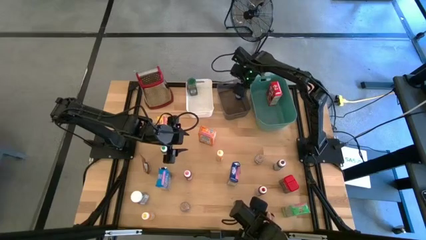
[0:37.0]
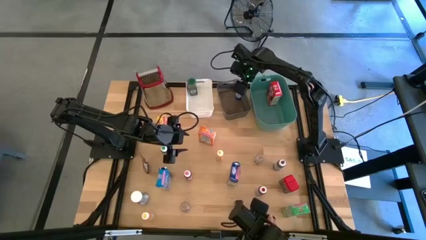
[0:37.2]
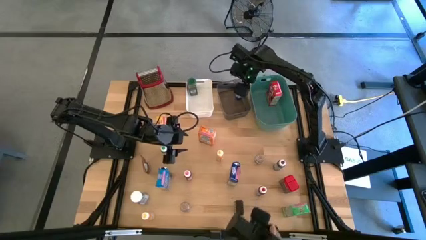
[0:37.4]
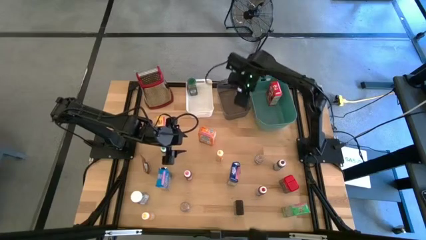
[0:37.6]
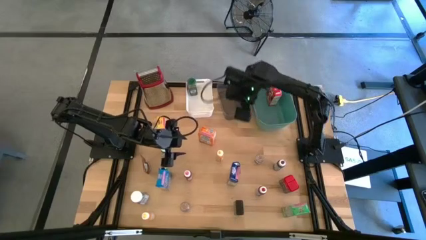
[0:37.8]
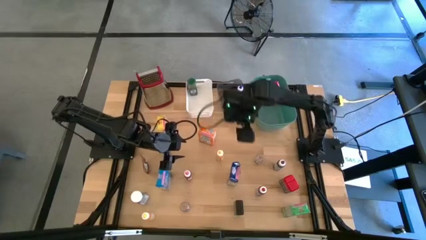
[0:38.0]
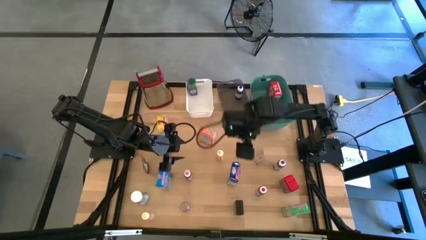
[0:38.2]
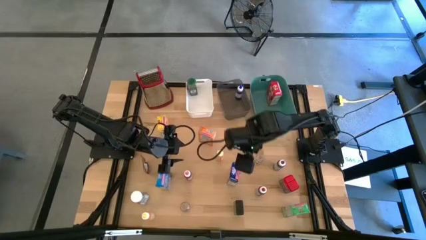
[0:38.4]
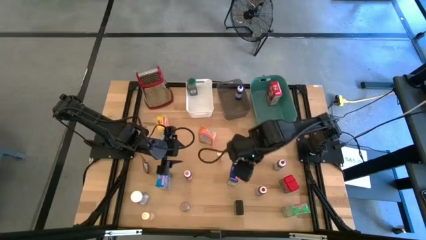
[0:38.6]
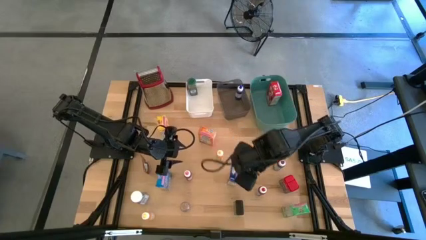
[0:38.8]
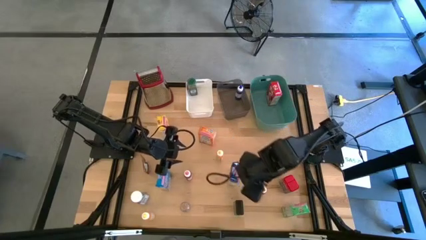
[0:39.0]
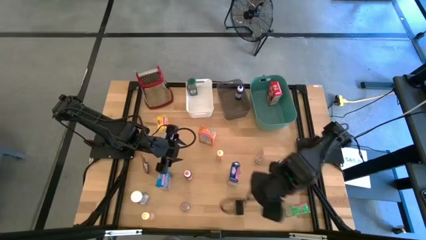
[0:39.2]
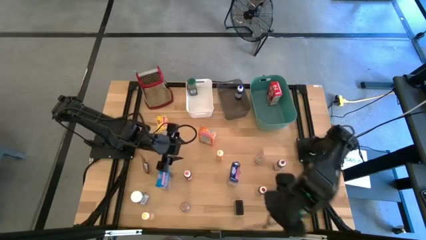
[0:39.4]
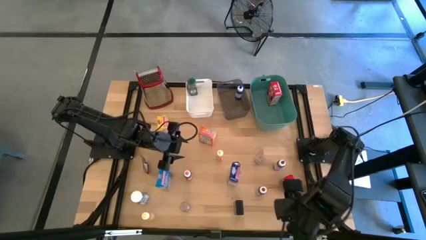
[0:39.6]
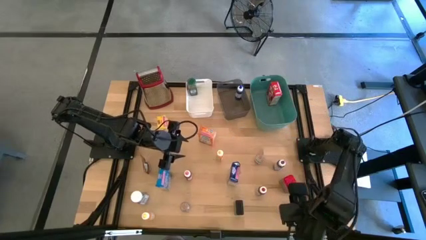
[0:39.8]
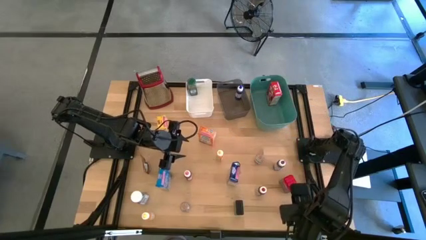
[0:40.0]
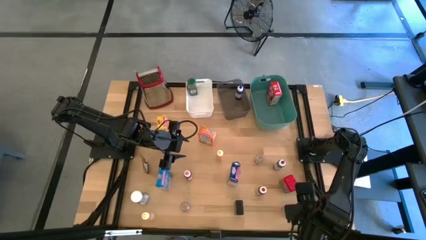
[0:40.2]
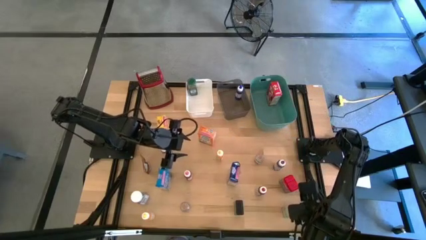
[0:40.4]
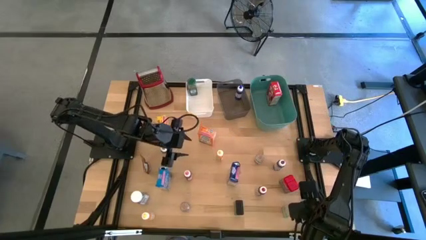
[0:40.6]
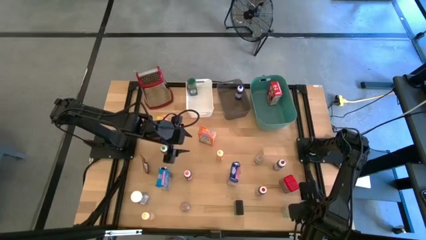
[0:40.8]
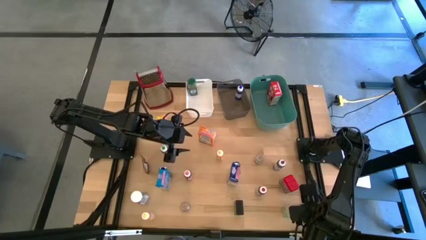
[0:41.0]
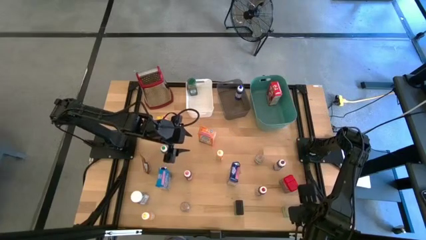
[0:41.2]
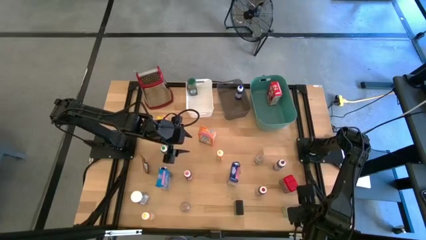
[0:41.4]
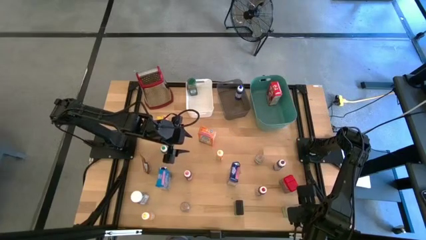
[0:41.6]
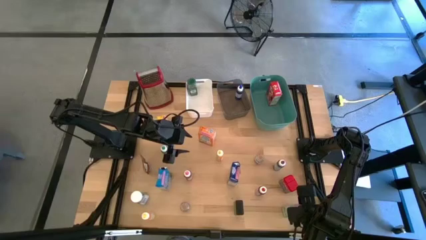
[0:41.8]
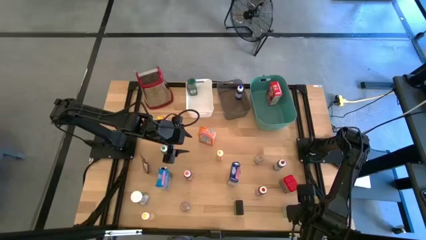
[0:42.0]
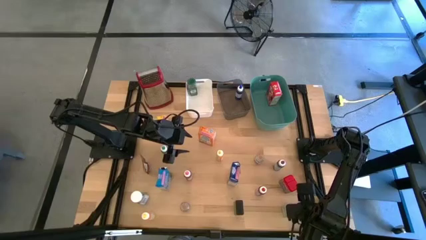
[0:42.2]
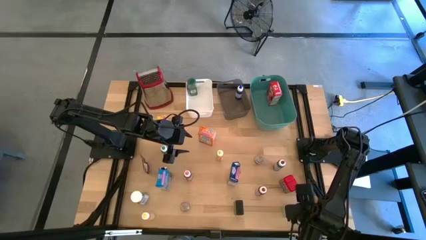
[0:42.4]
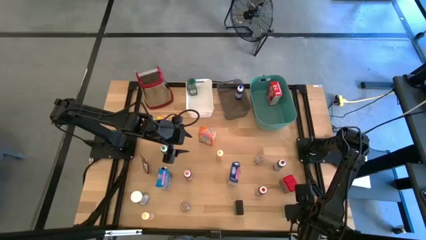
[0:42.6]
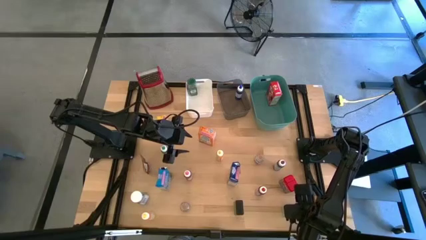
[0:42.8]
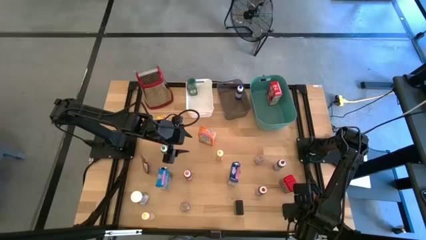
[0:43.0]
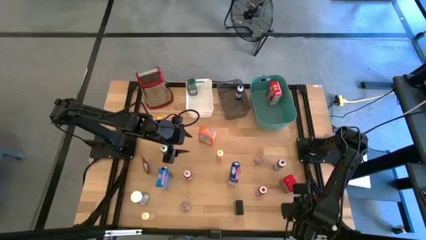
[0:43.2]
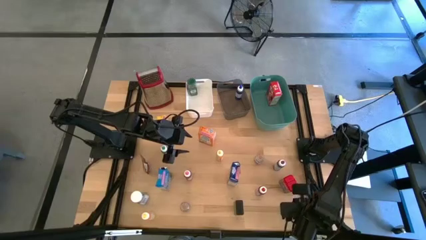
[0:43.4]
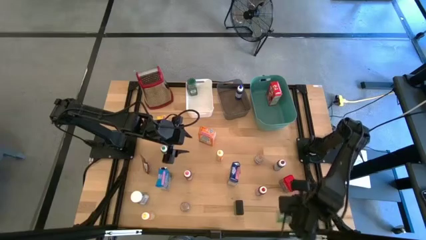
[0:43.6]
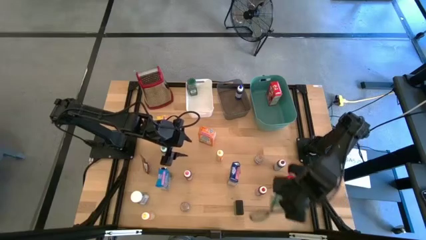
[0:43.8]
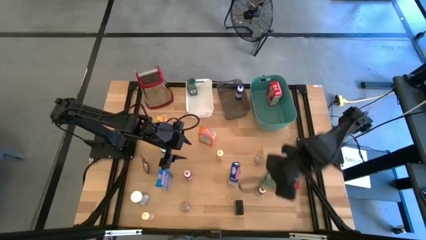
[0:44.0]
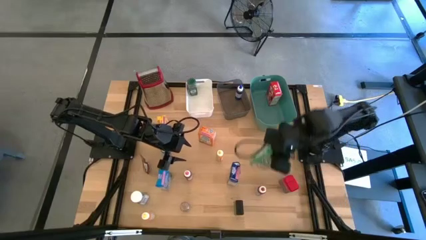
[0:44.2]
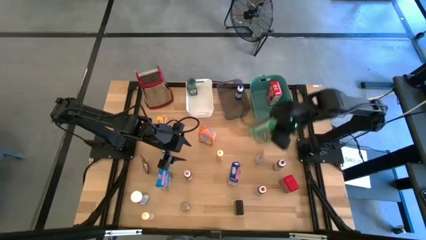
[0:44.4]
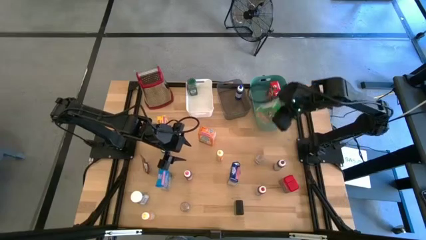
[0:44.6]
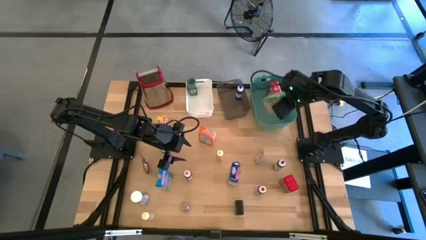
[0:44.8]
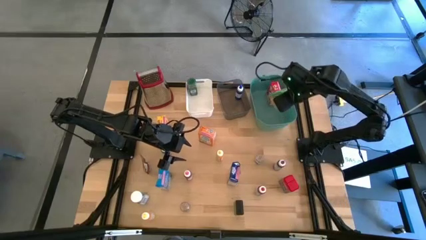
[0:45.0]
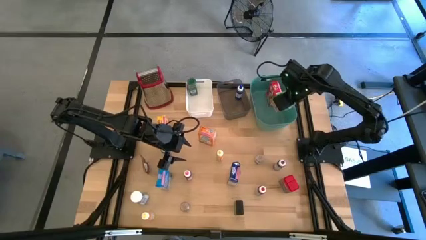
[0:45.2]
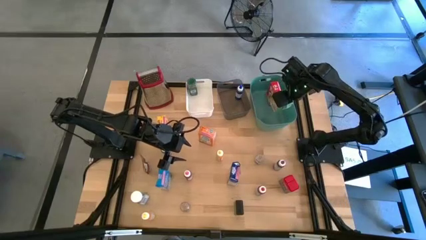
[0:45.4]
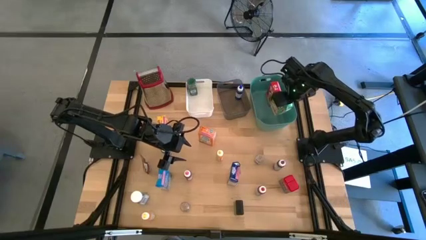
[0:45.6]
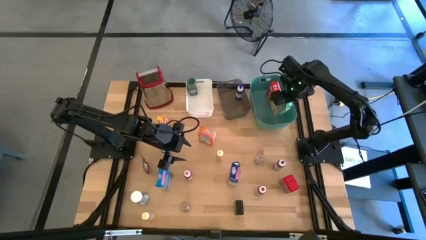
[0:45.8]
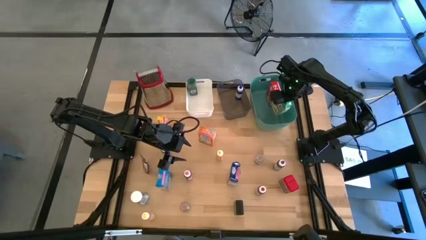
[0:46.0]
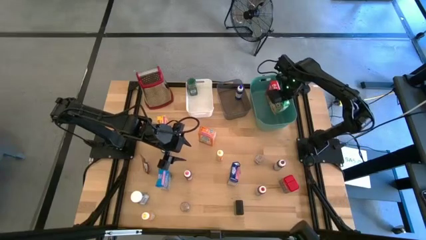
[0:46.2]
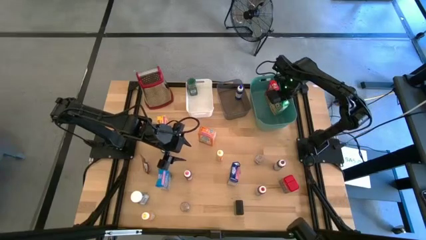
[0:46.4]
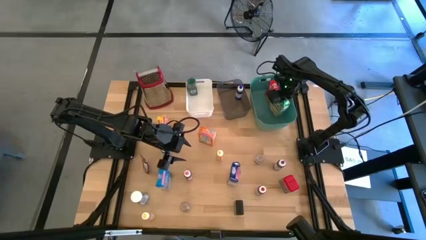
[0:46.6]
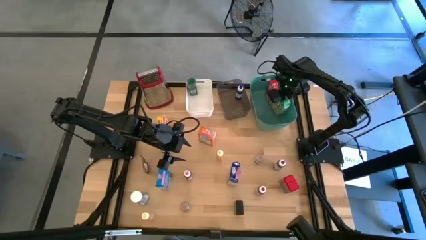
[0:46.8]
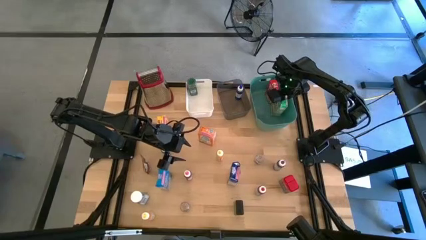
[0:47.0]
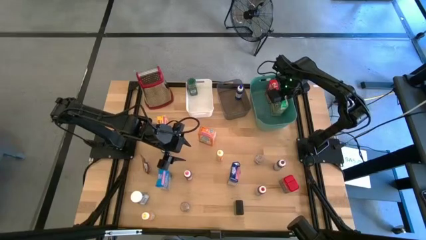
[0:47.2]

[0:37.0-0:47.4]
Task: Pick & Place Kitchen Items
Put the green cereal box into the green bin

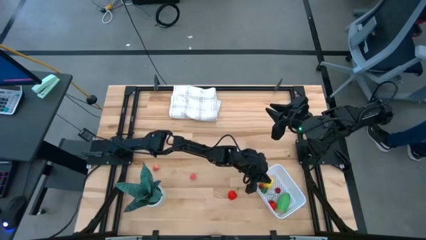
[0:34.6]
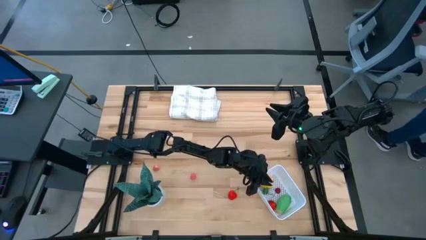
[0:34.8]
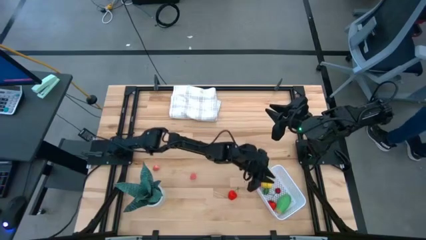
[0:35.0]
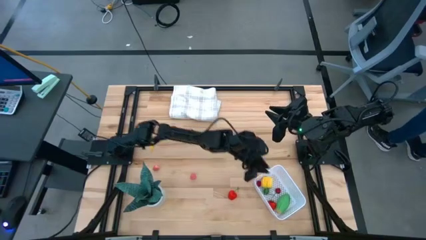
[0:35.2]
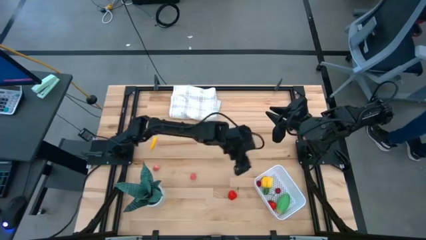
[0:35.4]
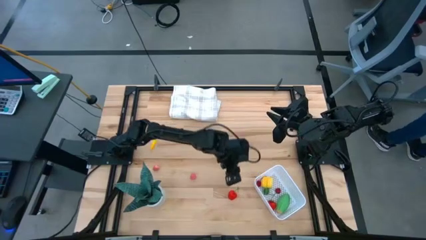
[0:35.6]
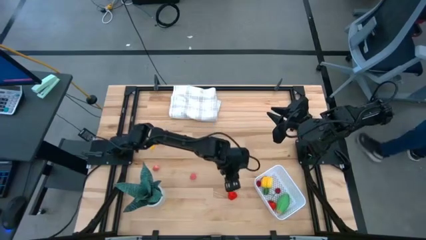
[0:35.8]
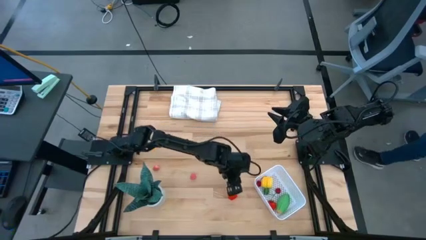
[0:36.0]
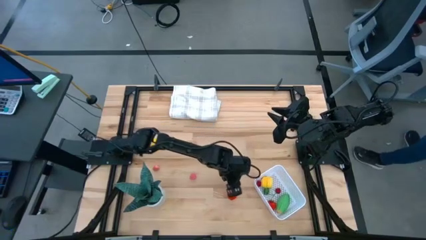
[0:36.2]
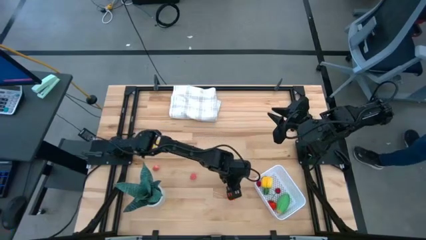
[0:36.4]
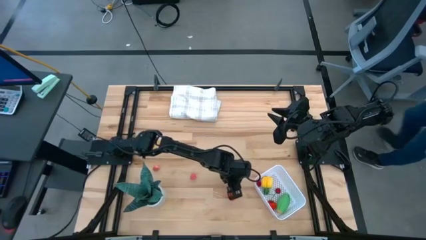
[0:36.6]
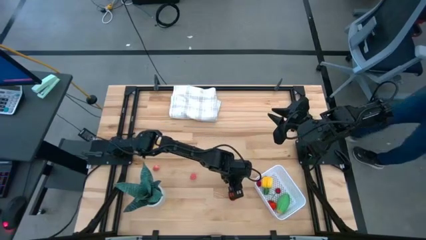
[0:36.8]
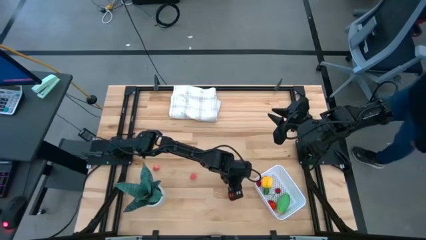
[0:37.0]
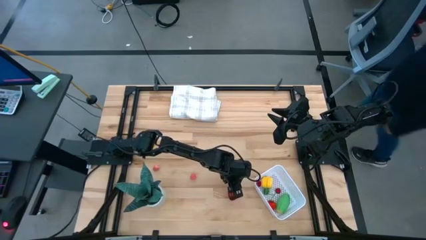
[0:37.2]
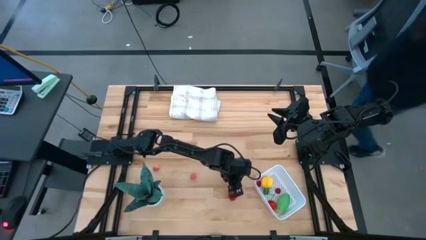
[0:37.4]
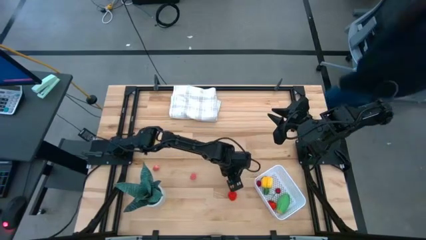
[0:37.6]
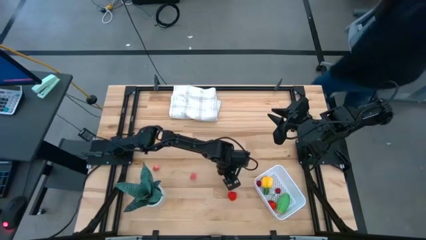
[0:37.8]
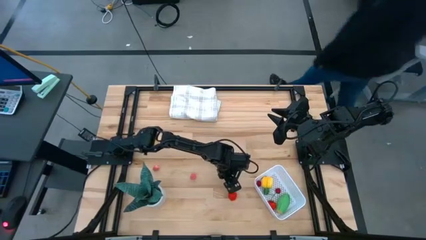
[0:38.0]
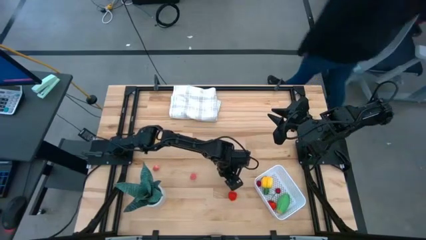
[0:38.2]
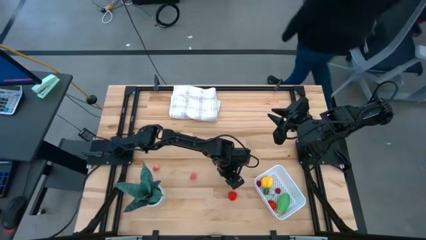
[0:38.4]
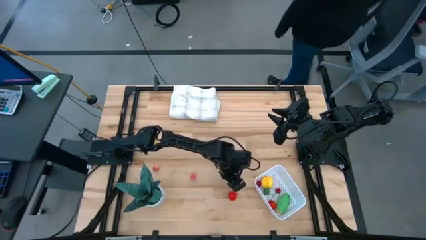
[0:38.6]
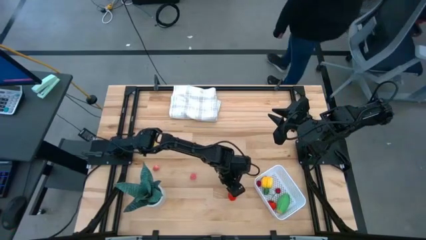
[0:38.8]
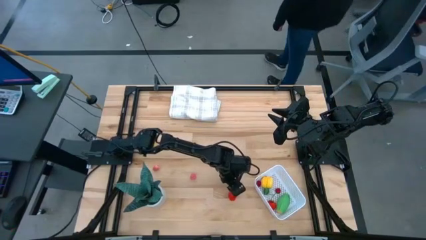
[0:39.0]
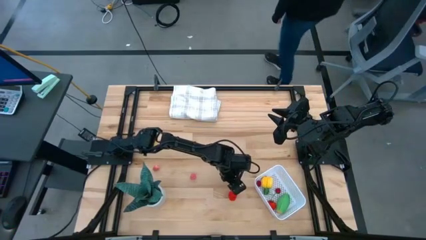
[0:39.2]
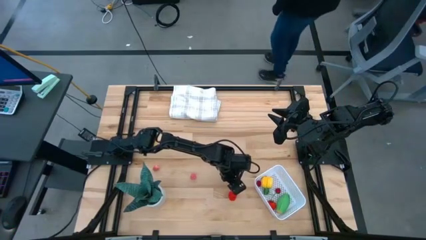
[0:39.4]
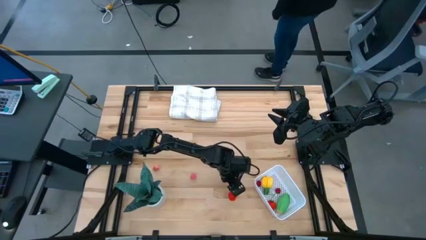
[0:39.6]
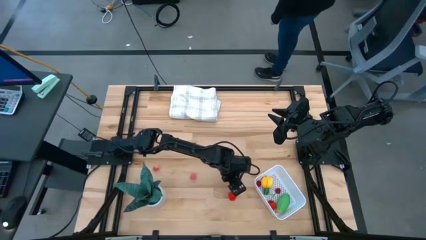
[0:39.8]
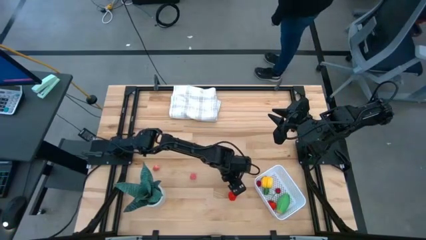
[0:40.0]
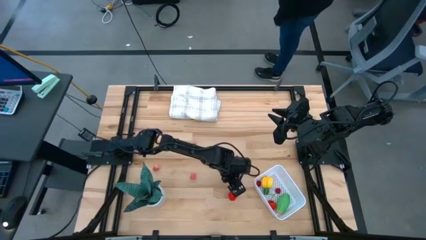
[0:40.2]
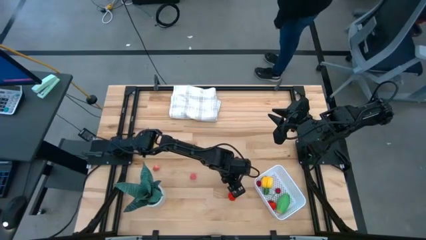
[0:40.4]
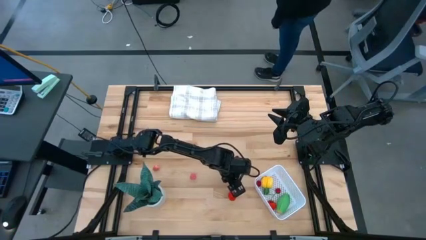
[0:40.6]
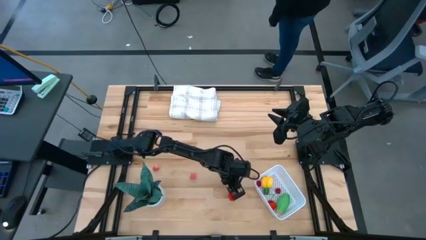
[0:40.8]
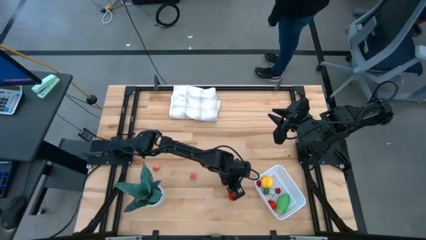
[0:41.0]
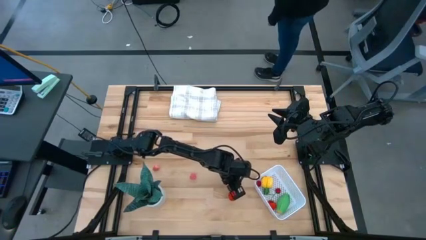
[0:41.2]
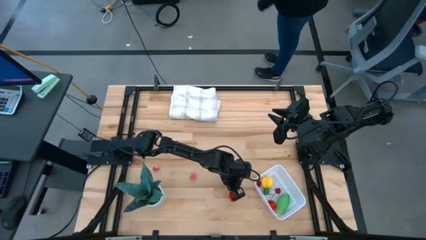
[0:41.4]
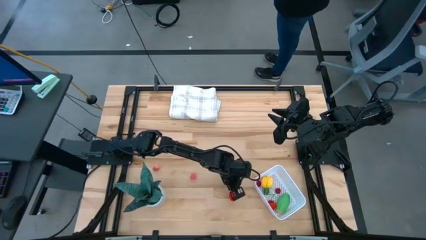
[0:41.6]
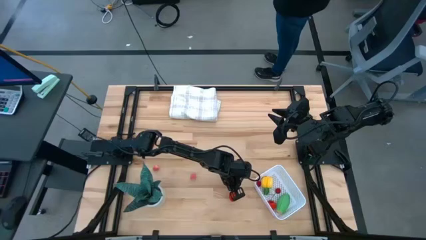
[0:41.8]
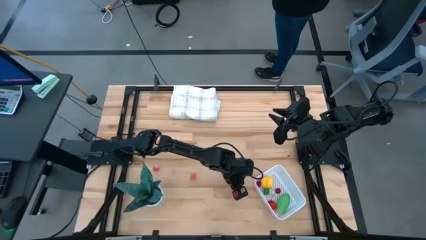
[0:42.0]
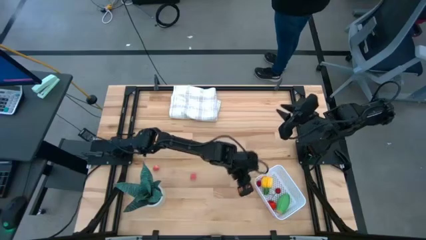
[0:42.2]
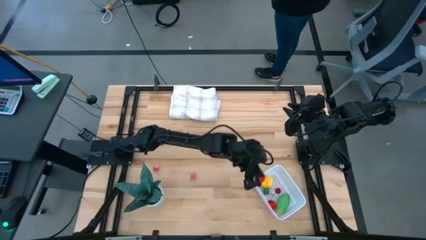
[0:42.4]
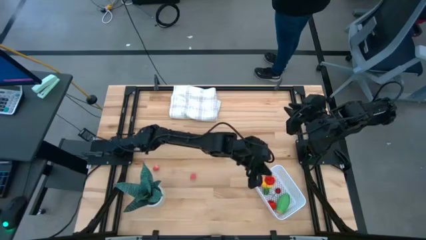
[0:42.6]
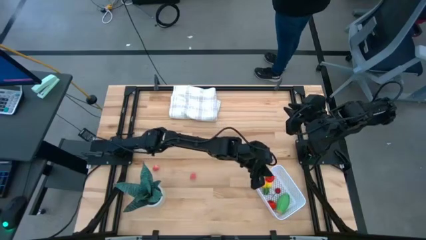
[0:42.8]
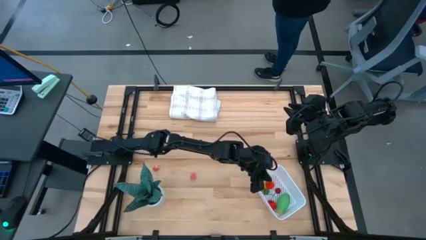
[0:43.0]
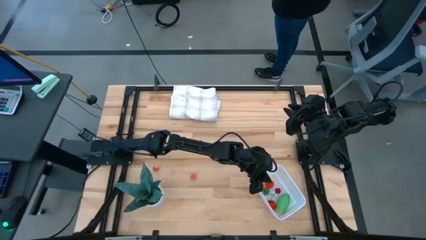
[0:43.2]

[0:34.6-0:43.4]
Task: Pick and placing Produce into tupperware
Put the strawberry into the white bin
